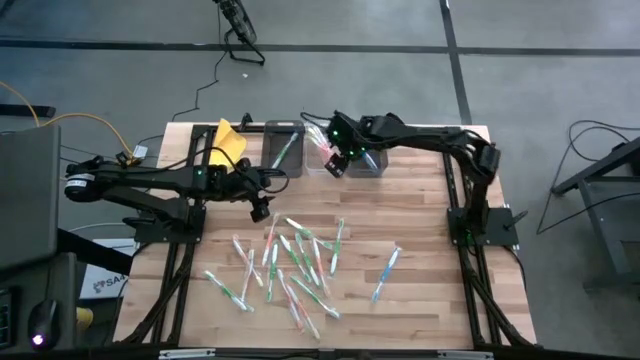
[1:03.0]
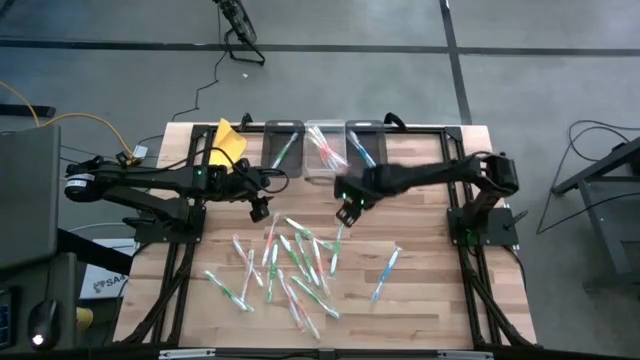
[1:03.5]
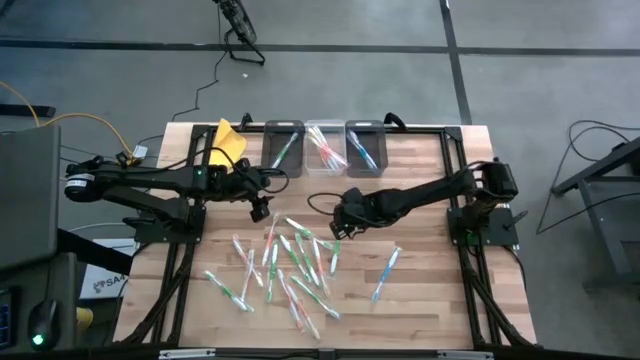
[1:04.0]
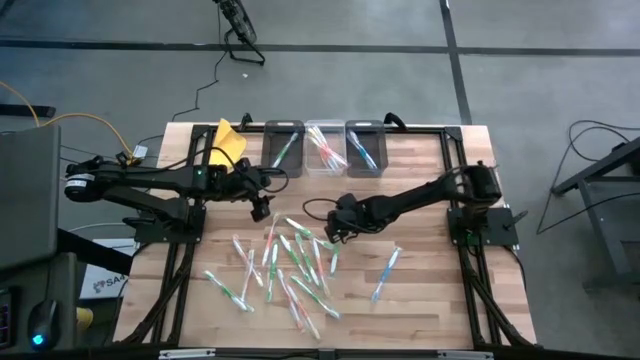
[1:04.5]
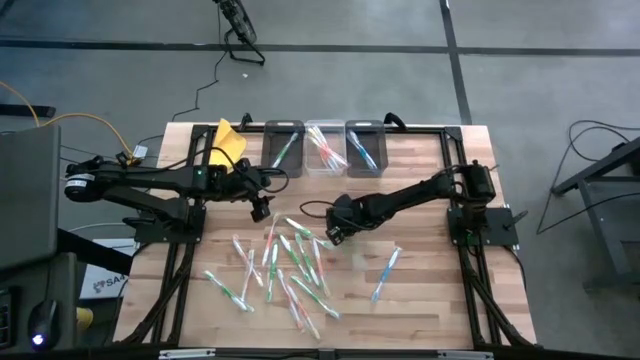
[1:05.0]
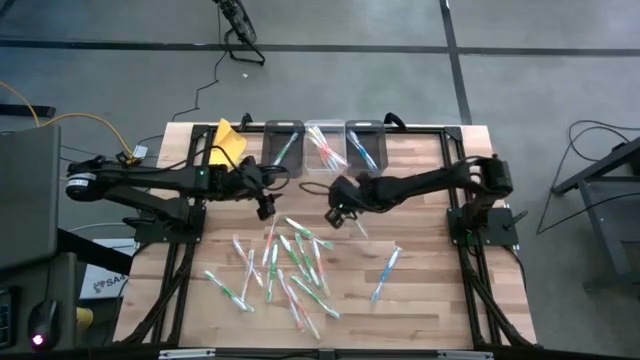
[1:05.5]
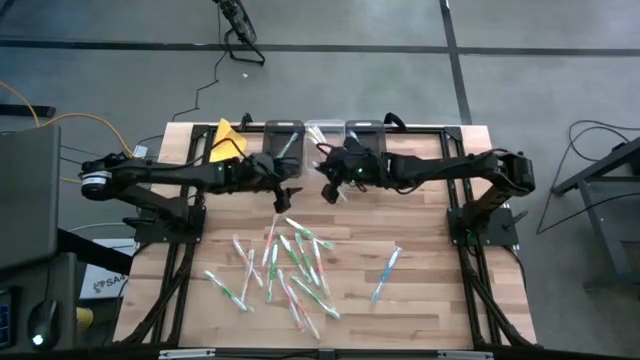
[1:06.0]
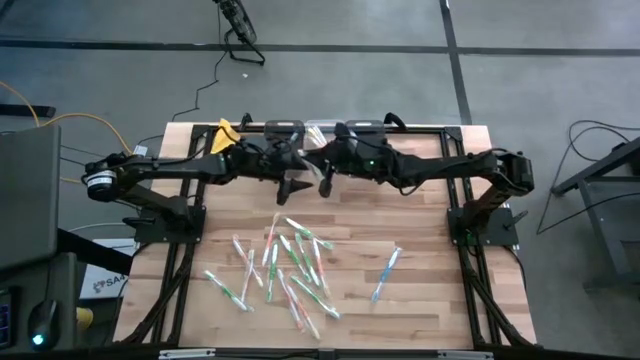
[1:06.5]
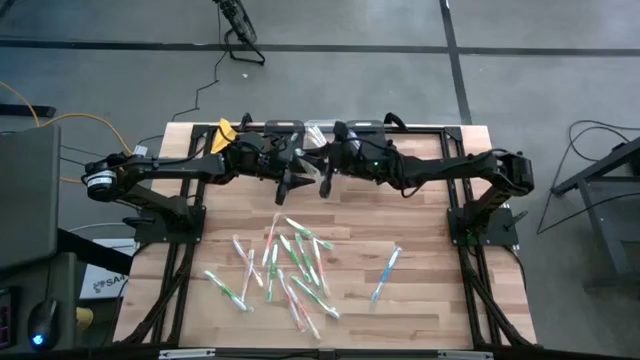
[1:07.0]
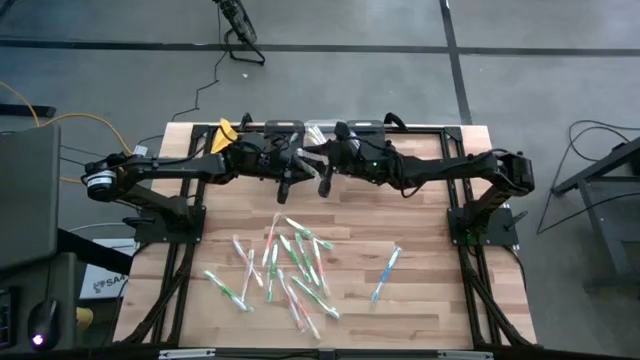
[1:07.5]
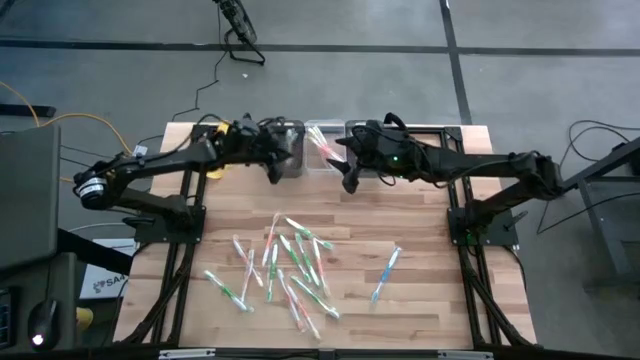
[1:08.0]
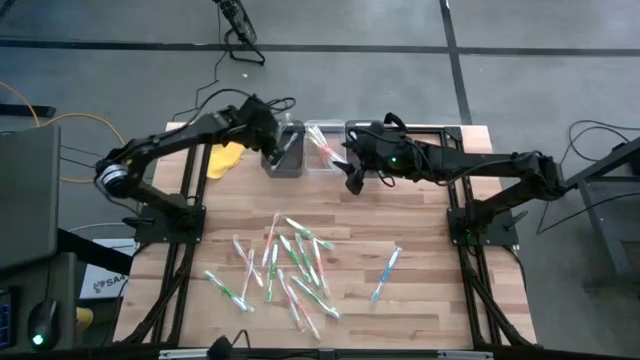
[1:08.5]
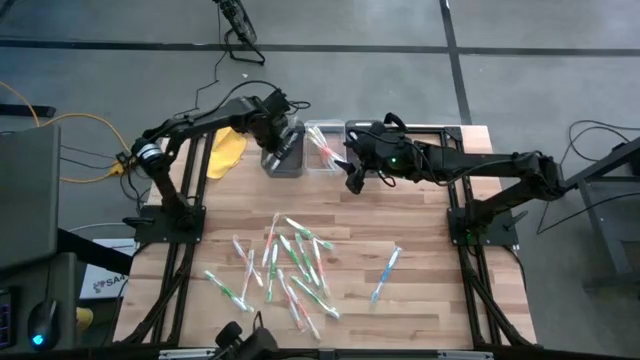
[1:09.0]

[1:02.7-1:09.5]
Task: Pick & Place Toothbrushes
Put the green toothbrush into the left black bin

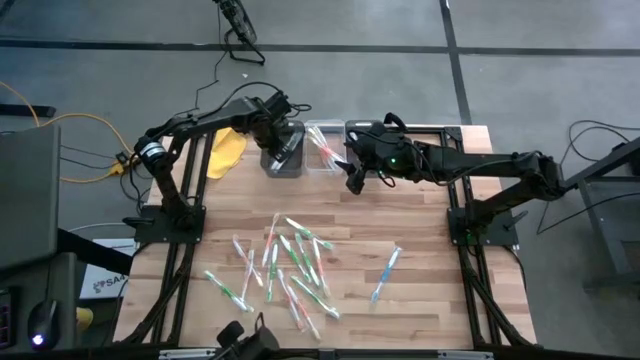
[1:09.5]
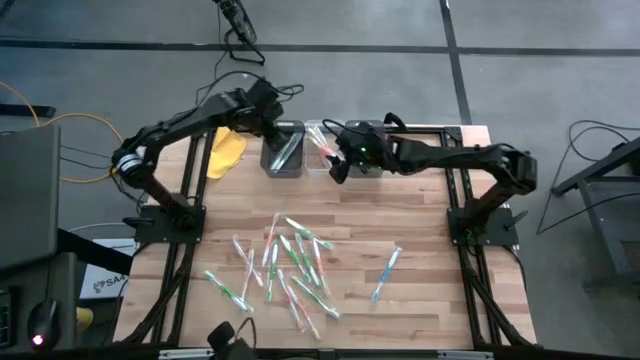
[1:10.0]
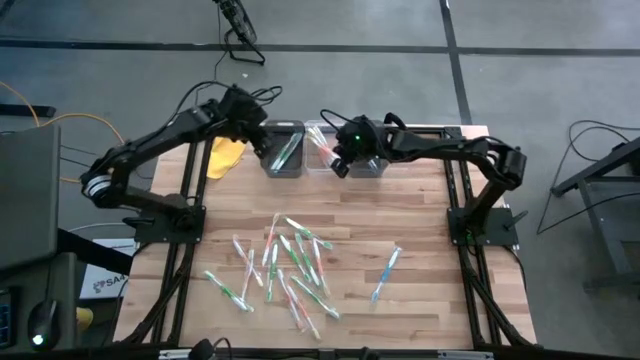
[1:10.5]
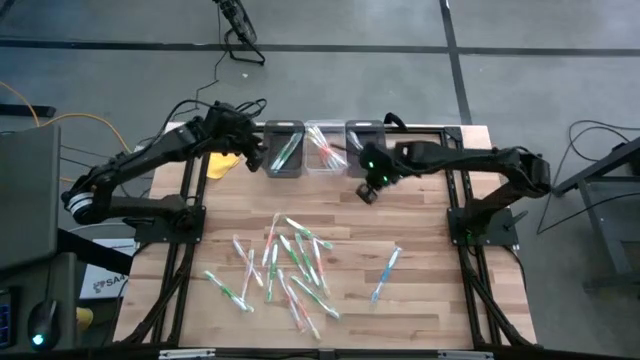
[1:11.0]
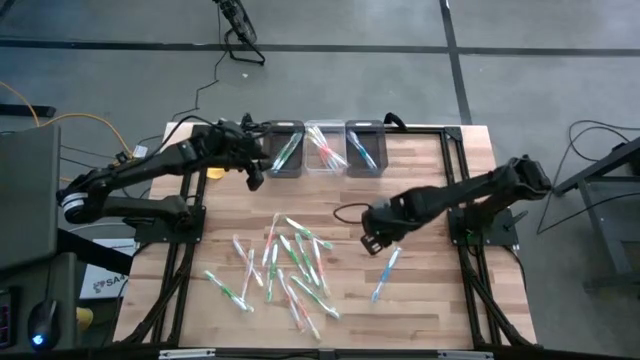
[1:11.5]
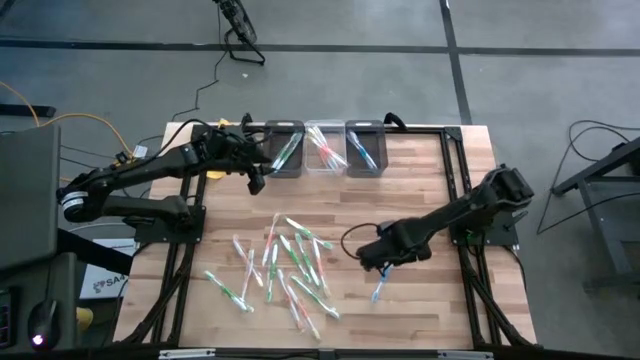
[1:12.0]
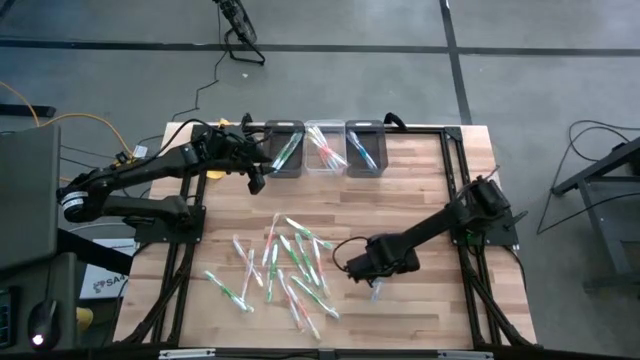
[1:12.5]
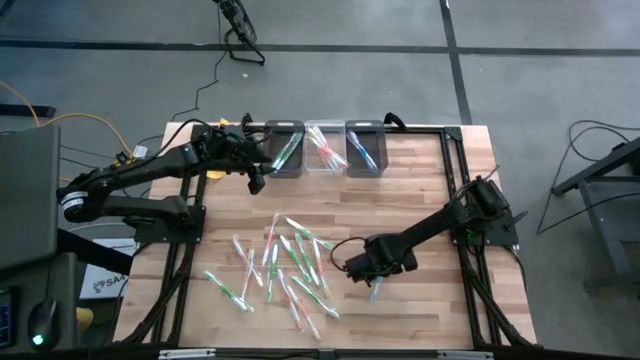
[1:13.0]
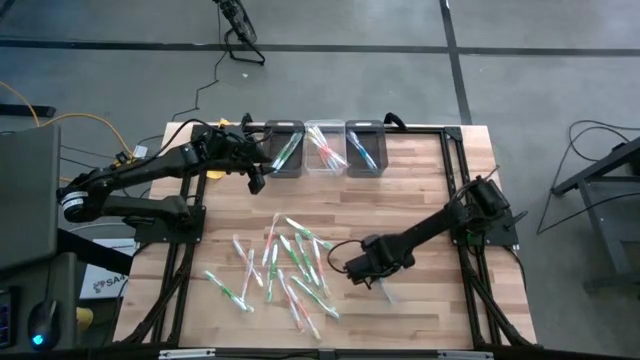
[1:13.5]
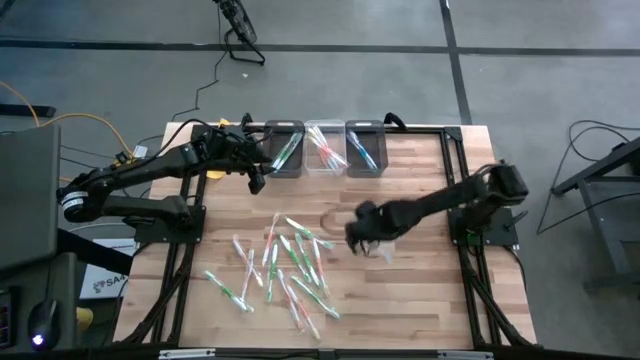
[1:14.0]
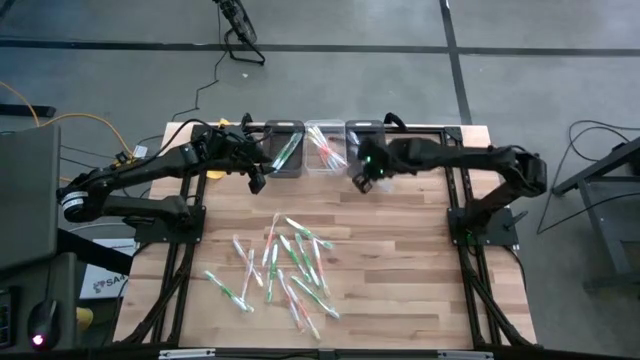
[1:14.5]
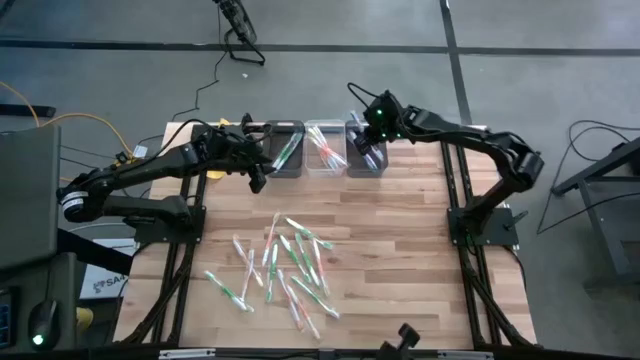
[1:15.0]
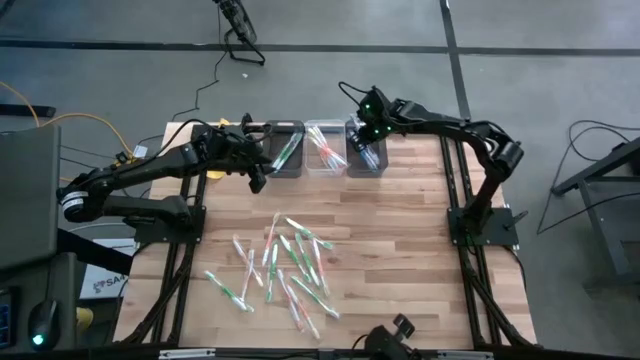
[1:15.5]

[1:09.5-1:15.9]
Put the blue toothbrush into the right black bin

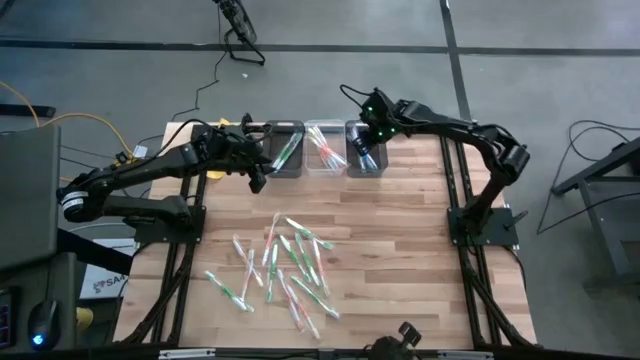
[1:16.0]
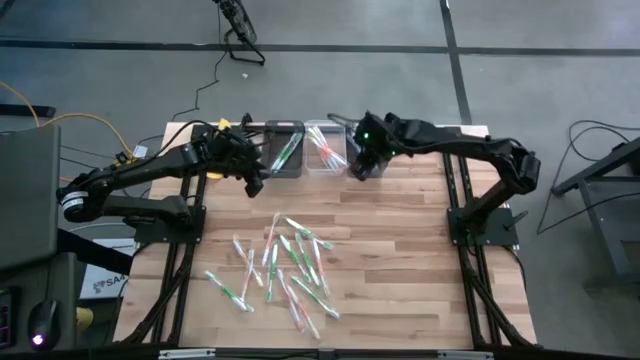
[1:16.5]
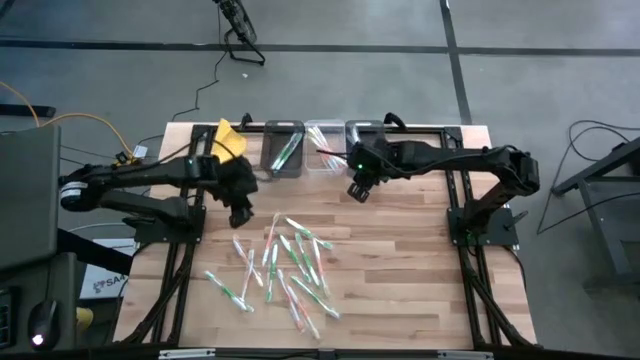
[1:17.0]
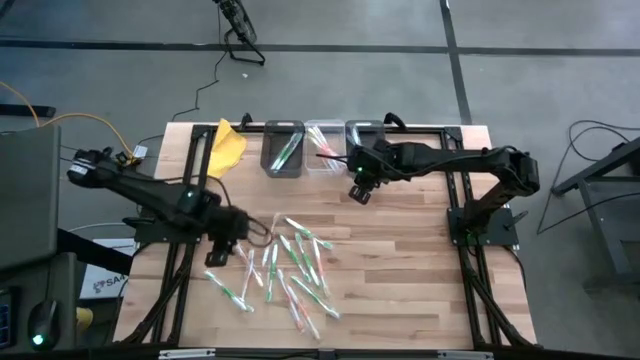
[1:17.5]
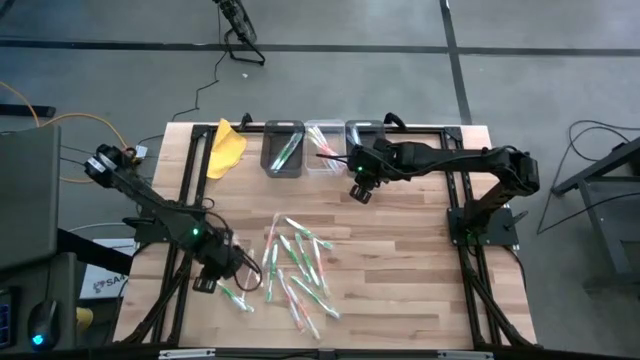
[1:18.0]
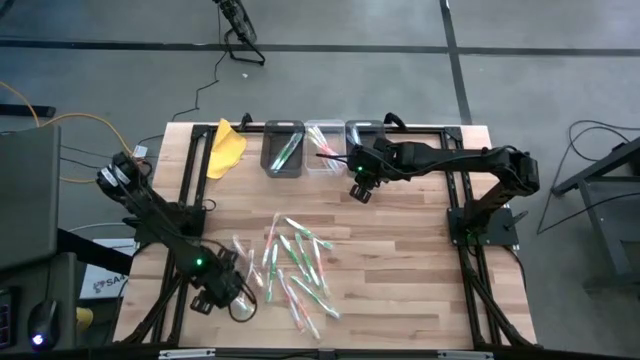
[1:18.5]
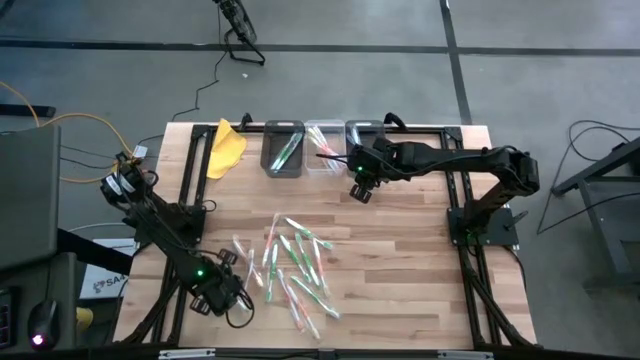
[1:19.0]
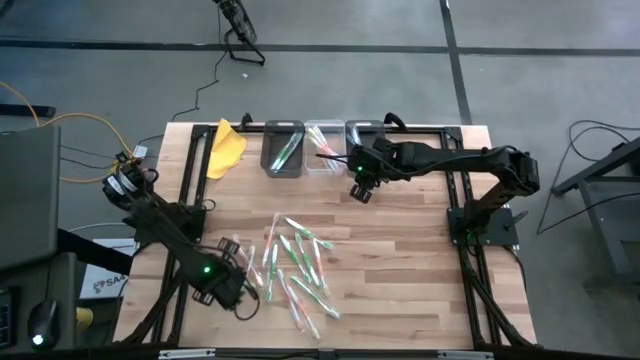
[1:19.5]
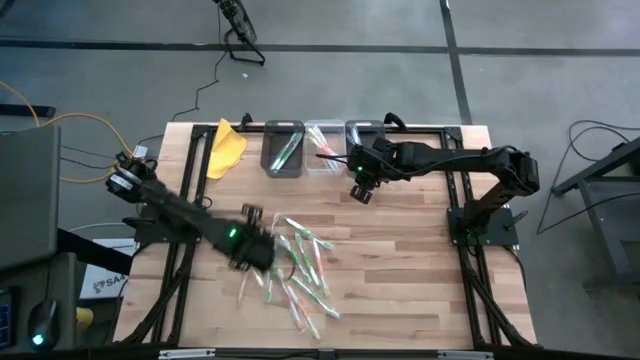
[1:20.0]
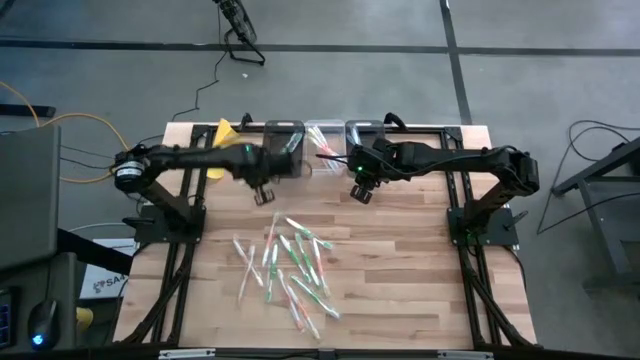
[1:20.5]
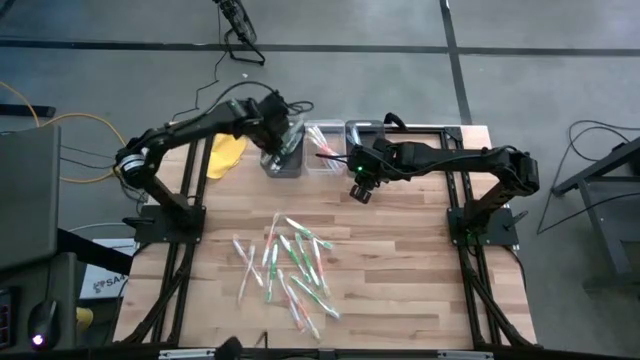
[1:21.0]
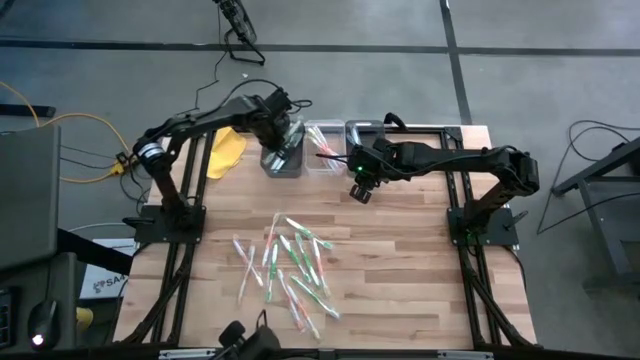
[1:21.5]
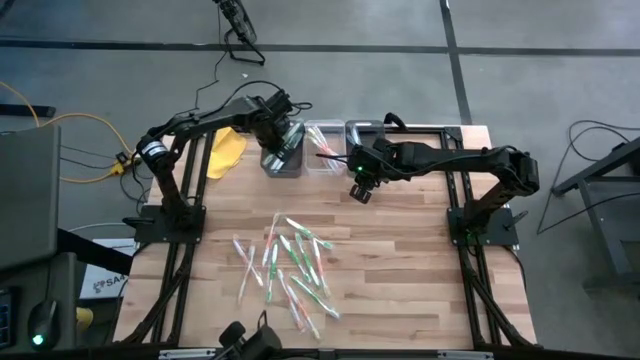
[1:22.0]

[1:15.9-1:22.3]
Put the green toothbrush into the left black bin

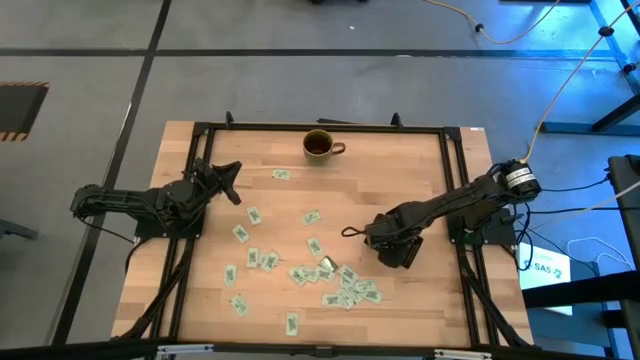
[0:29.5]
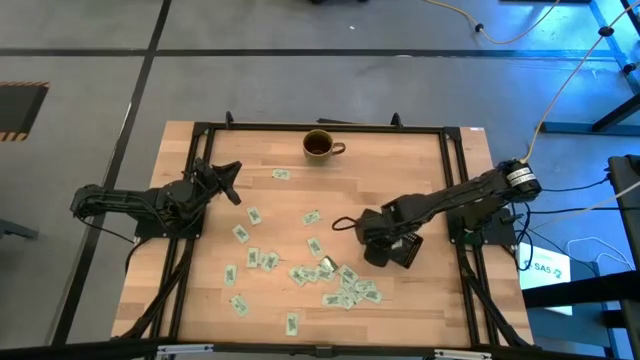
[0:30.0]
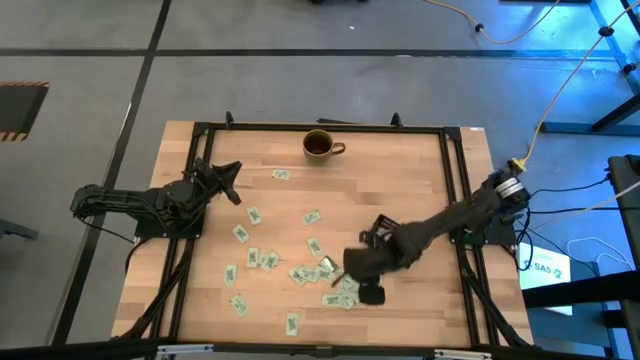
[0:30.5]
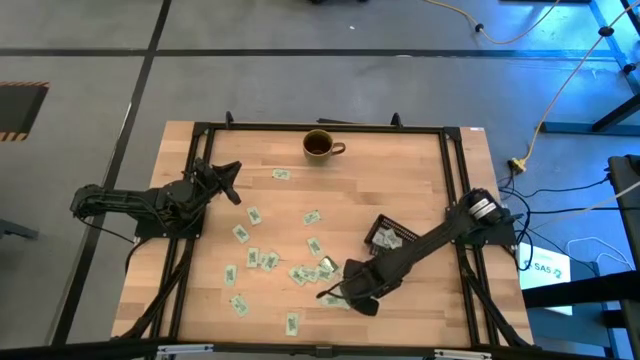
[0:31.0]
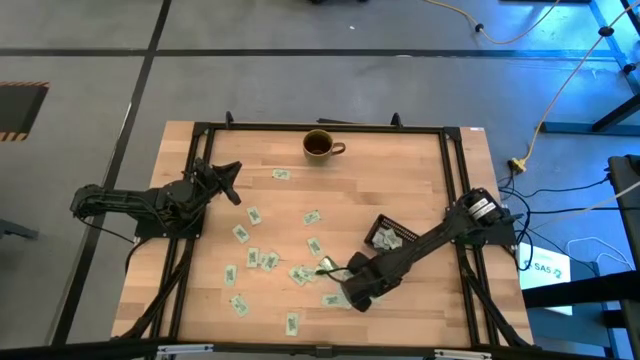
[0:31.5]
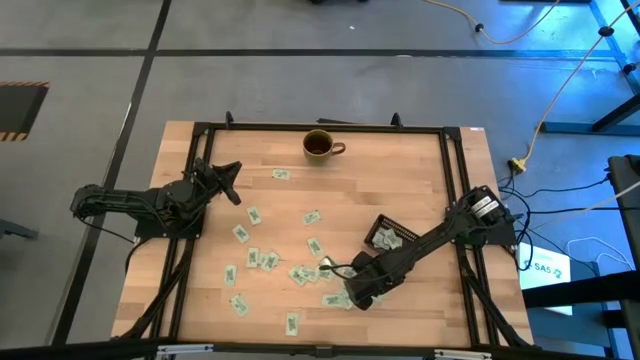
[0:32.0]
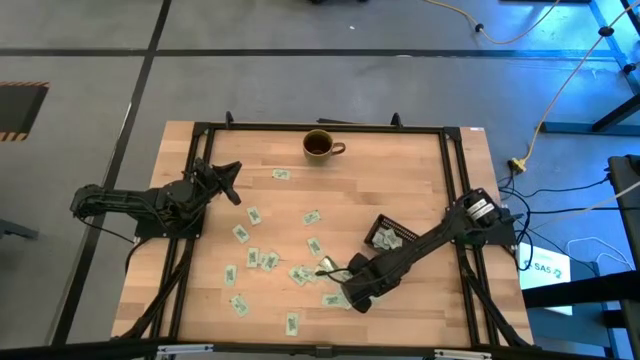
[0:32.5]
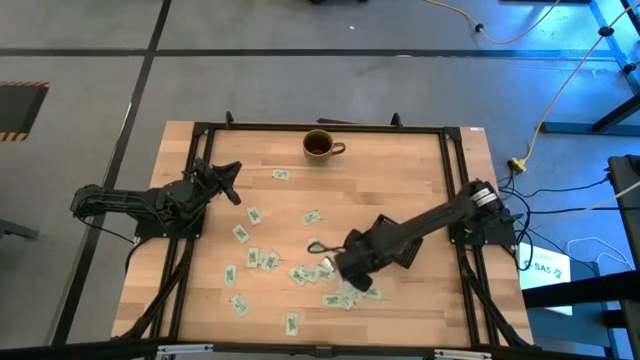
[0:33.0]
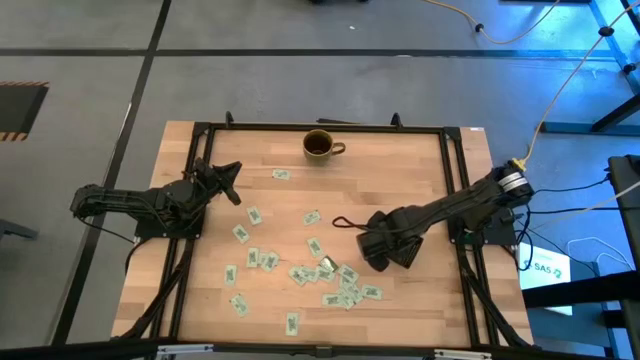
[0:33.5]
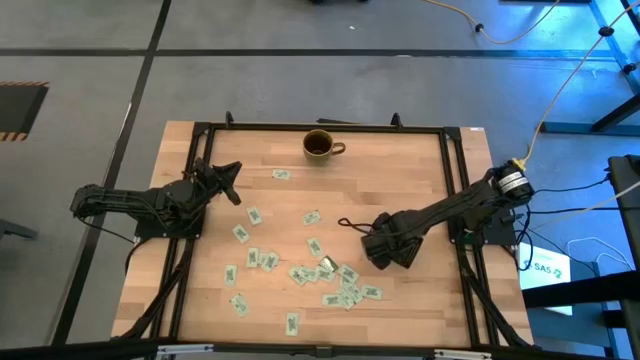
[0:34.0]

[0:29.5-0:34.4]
Task: Pick and place Stevia / Truvia into bins
Put the stevia packet into the black bin
